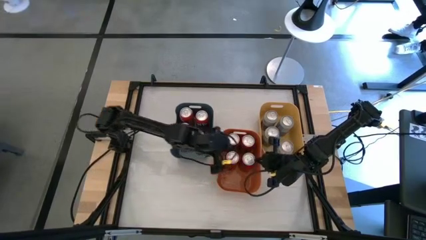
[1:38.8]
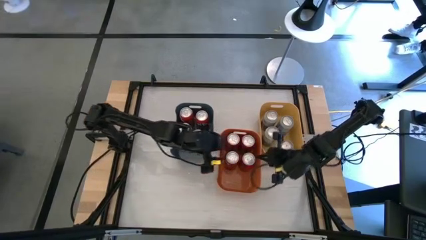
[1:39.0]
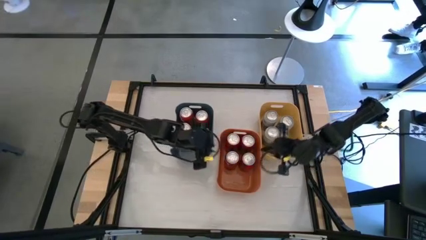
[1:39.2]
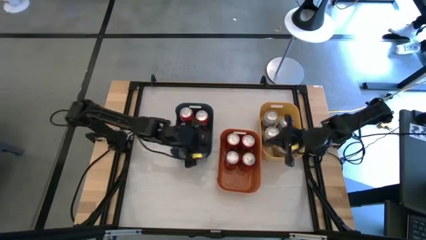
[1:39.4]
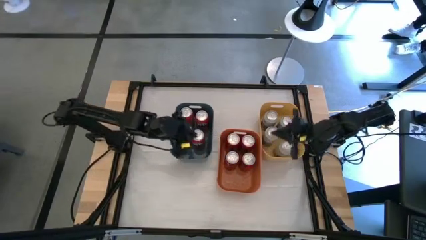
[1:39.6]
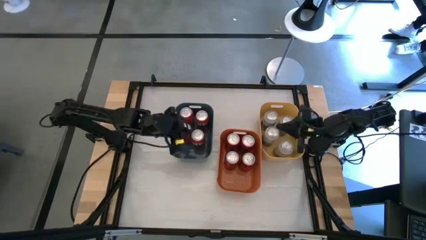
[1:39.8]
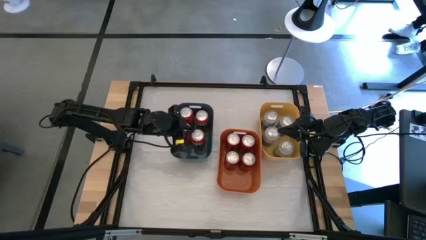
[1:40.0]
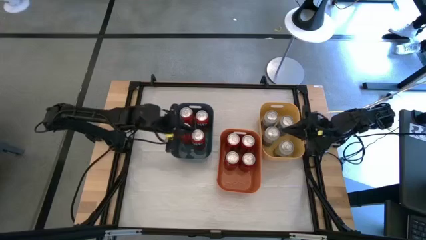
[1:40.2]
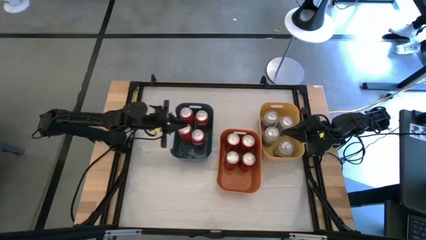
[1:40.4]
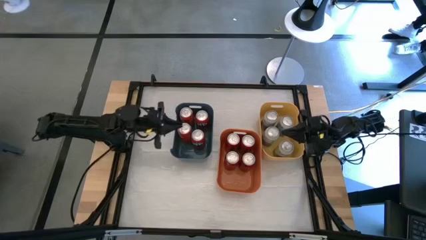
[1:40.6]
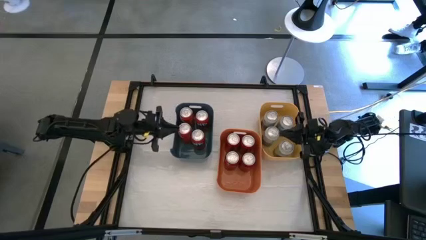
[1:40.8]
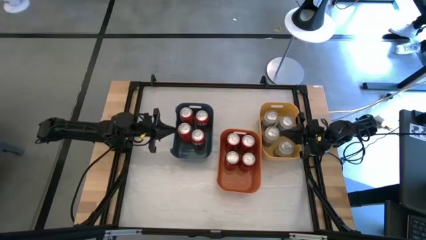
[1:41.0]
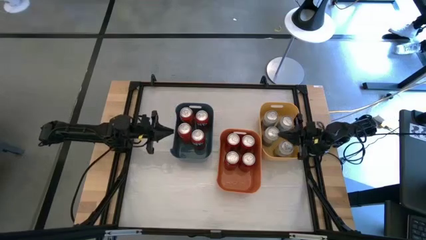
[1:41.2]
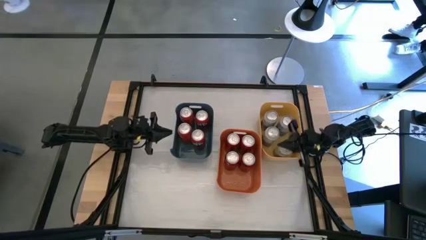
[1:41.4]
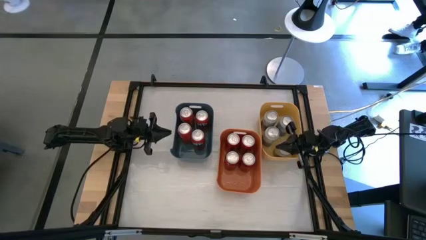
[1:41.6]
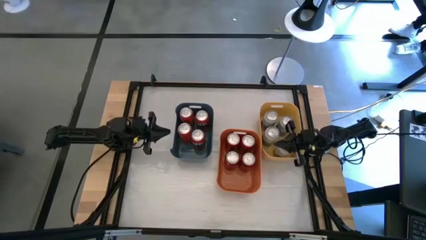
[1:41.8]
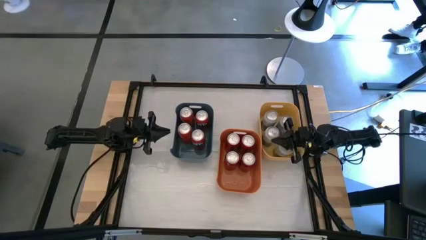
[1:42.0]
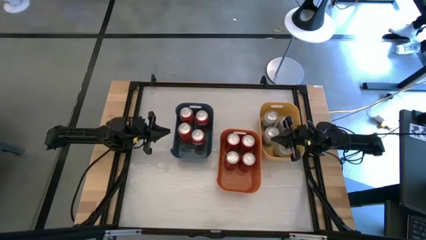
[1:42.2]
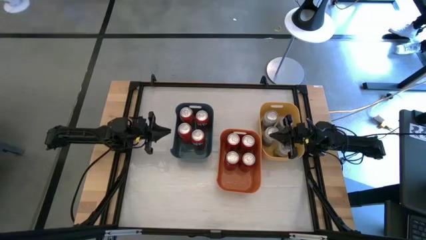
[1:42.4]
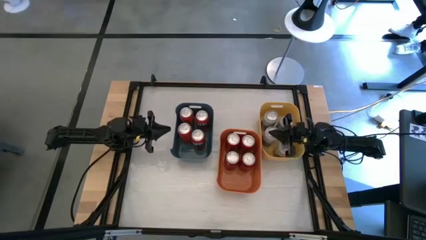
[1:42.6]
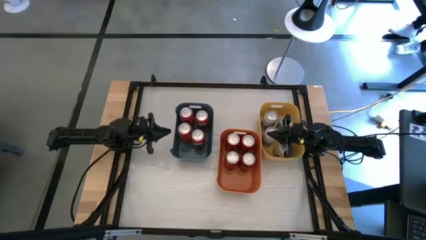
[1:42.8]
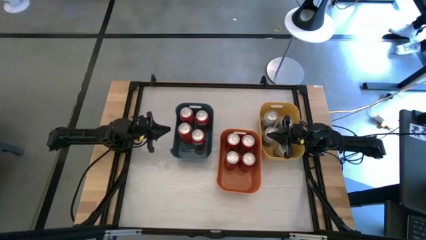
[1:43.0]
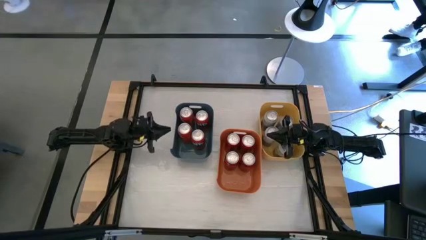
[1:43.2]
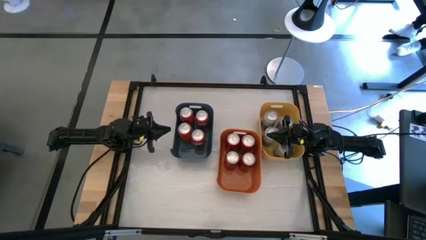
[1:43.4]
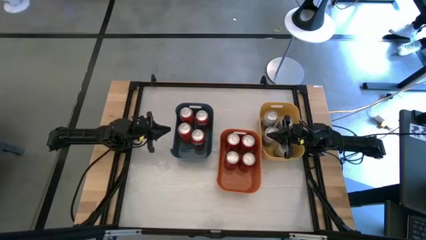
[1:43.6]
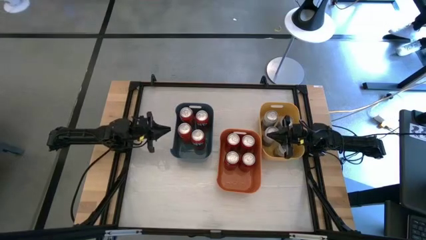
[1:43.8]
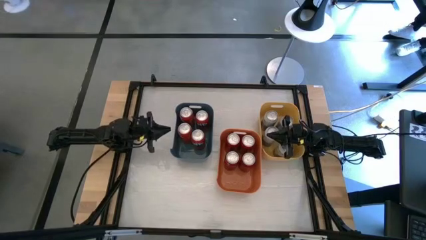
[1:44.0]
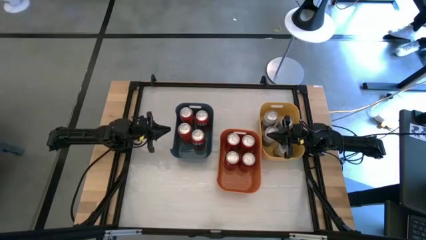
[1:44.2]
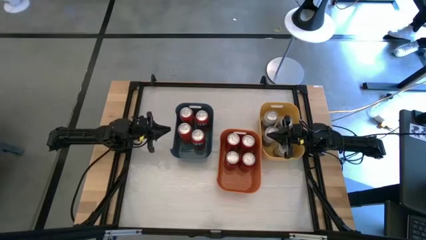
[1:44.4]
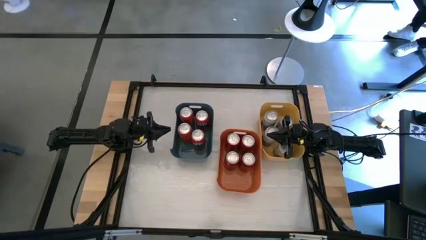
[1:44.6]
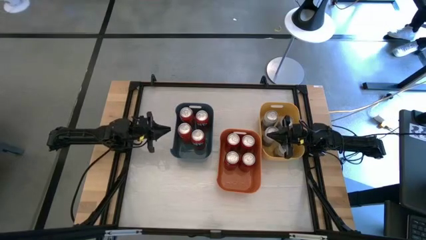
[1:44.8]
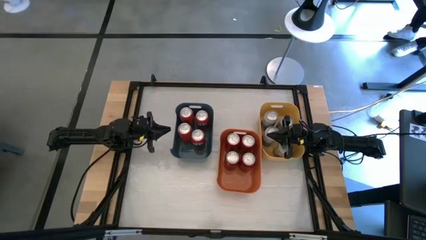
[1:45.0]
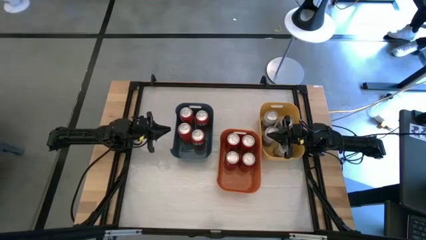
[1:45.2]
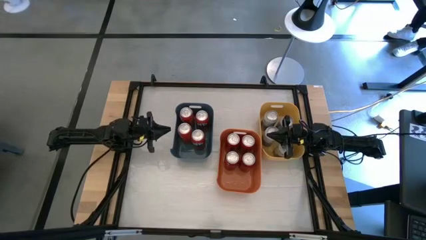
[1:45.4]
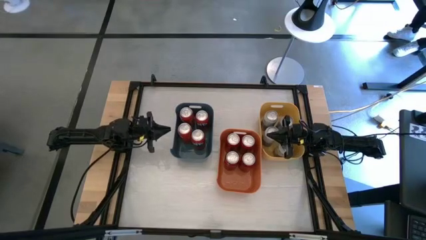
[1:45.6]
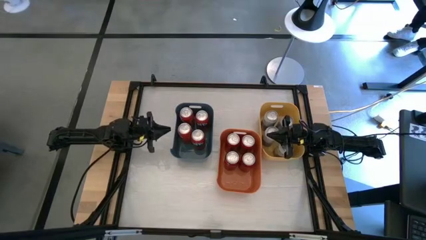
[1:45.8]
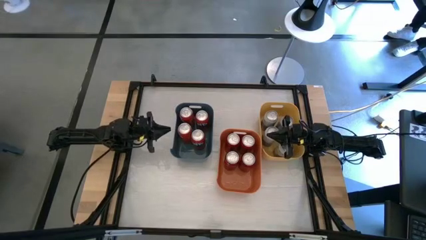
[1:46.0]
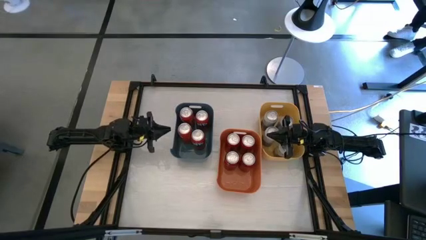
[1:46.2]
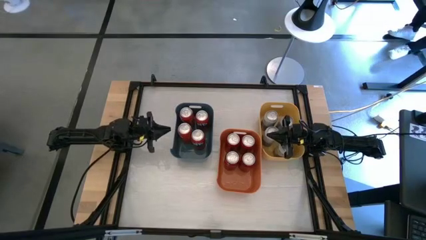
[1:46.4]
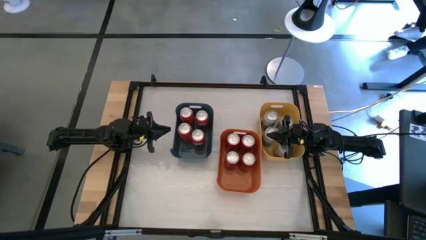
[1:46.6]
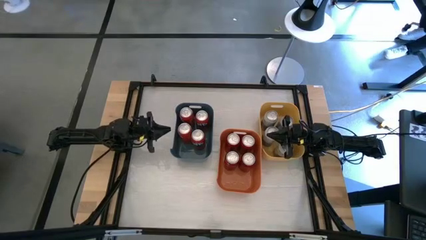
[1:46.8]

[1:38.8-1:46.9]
Task: Sort soda cans
Return to Home Position

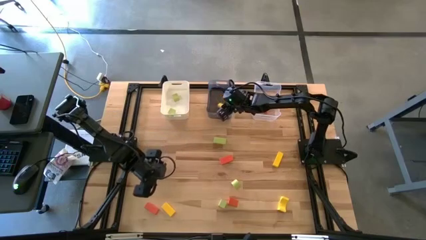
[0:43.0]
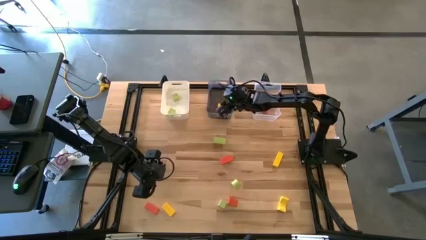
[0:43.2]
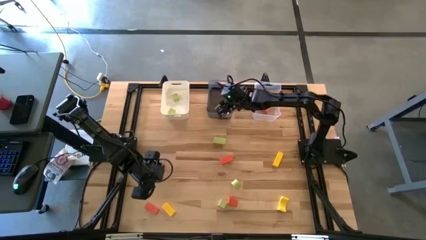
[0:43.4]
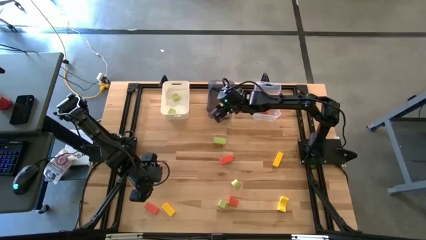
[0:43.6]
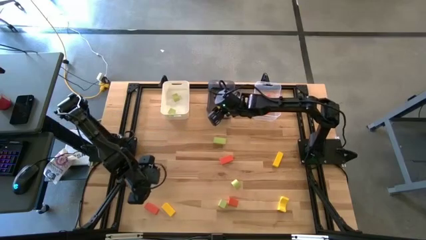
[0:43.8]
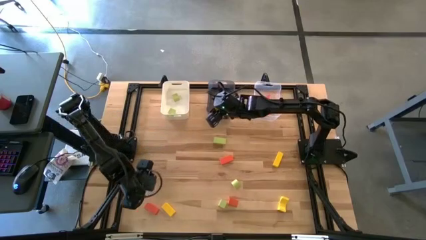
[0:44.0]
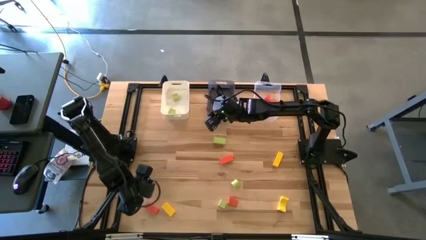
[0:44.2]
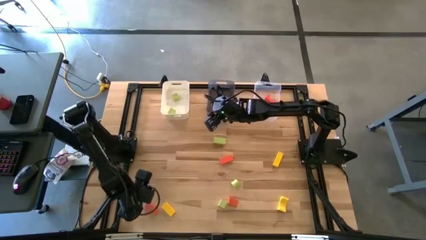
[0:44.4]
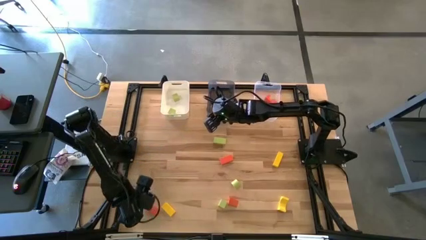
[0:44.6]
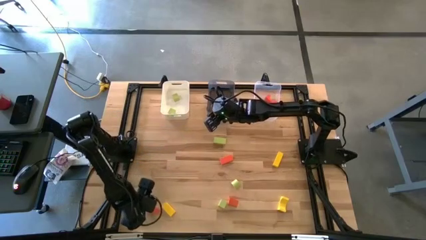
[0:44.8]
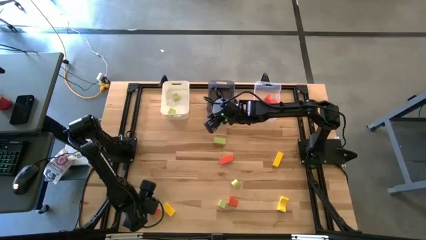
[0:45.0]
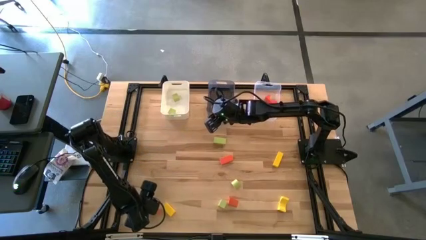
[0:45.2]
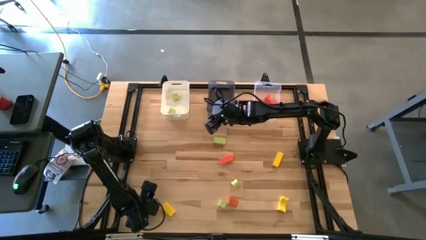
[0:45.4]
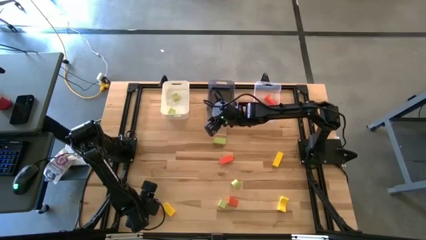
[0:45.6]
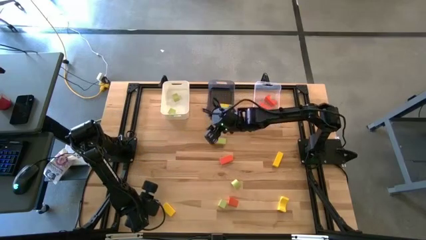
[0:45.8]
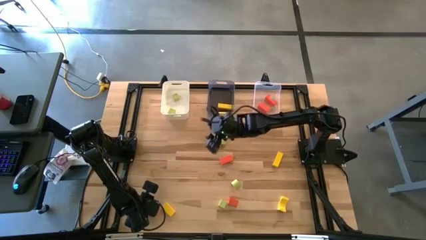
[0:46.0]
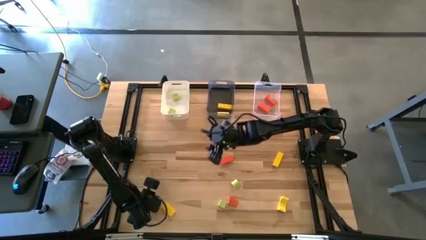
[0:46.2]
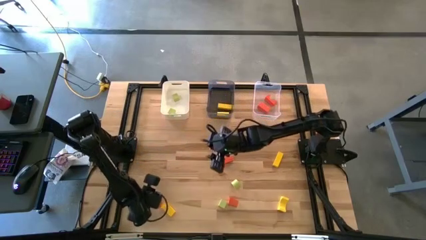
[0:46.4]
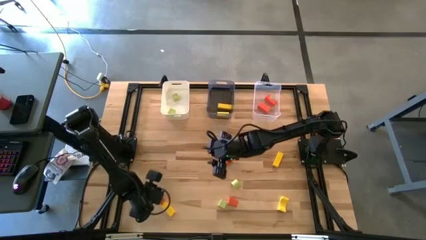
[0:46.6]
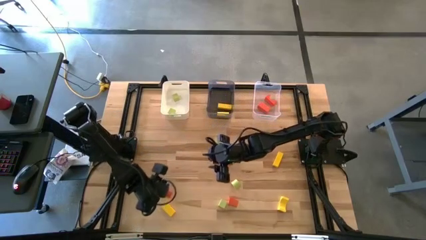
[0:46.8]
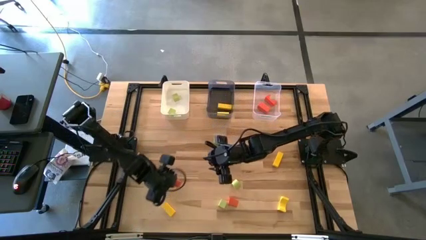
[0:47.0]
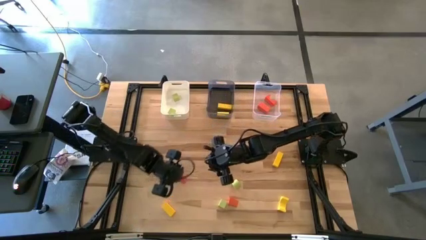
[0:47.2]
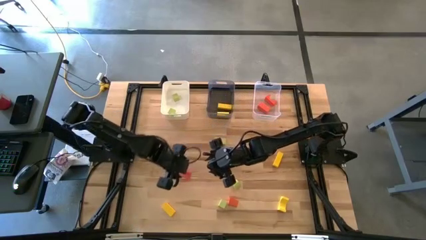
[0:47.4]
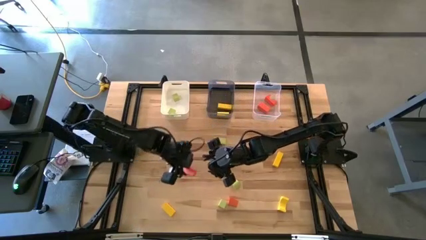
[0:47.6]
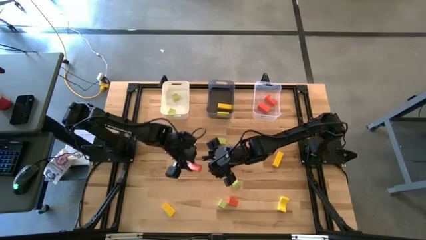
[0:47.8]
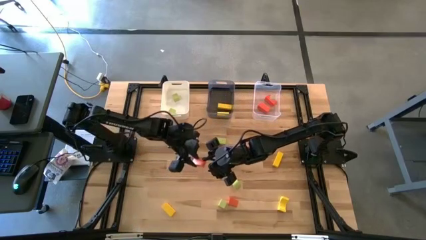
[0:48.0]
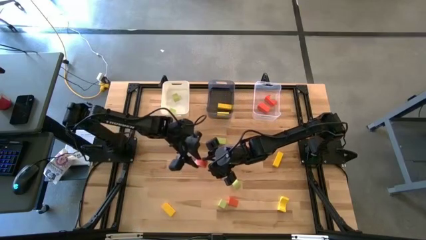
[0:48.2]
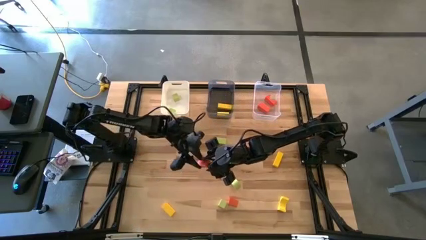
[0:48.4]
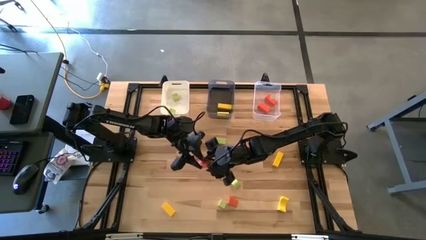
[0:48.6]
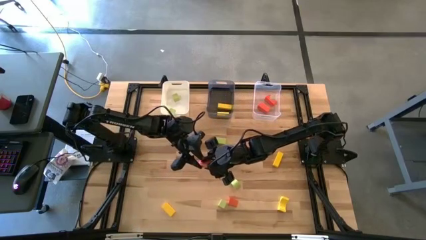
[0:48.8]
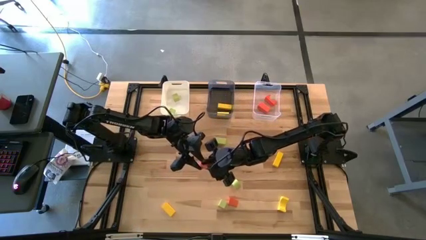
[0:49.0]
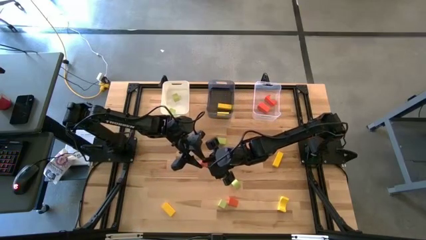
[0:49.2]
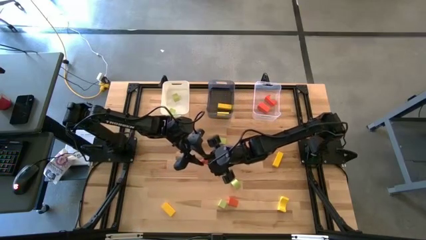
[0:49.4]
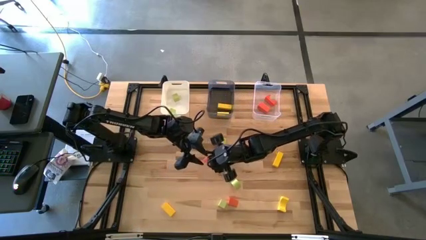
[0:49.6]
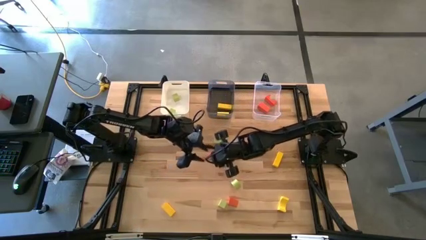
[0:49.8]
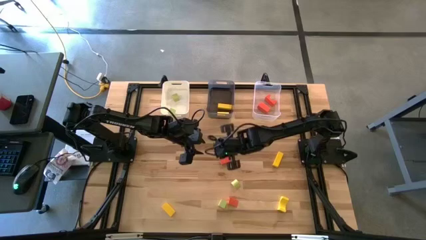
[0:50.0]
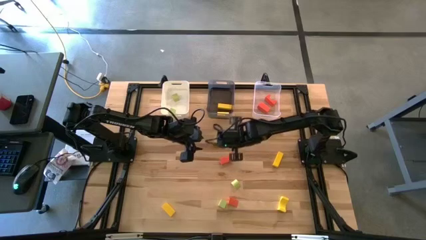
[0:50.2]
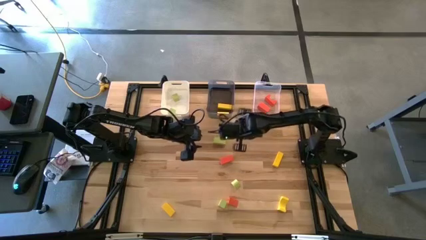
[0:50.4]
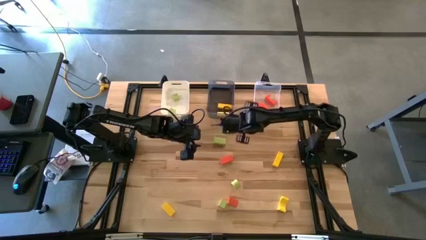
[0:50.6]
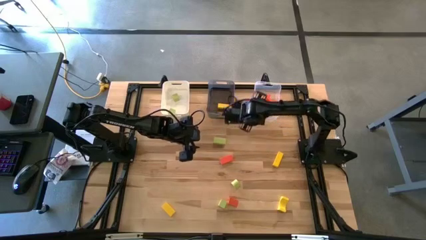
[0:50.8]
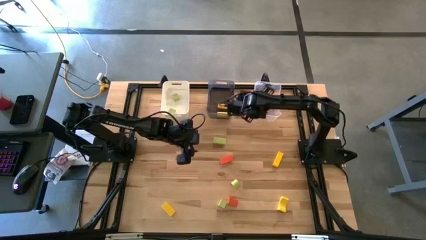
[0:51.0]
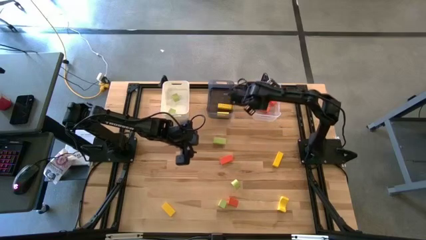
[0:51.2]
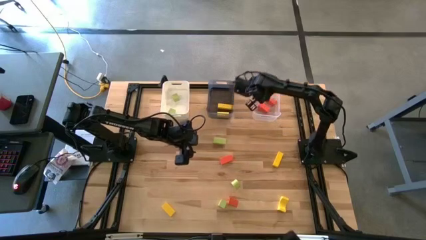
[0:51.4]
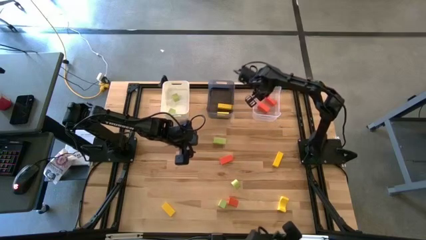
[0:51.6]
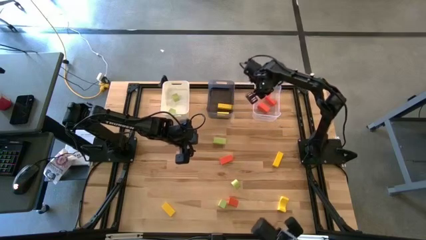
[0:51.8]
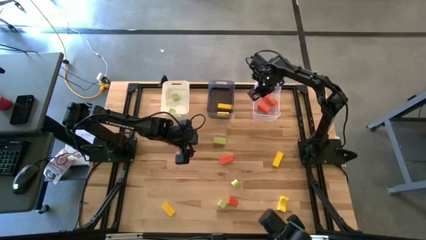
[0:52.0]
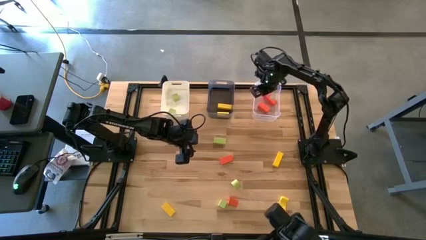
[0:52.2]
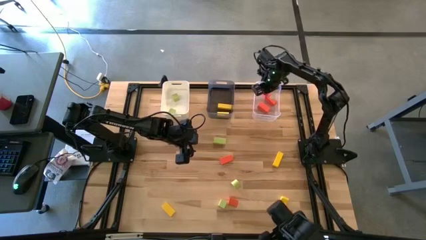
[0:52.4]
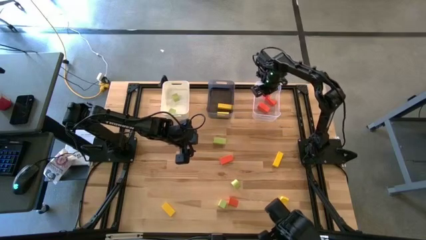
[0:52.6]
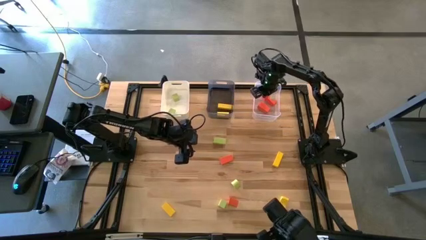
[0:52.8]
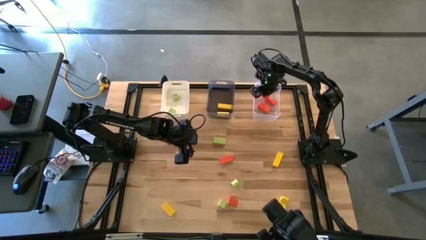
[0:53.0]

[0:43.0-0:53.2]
Task: Sort & place blocks by color
Put the orange block into the transparent bin
